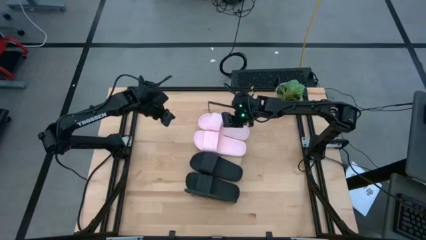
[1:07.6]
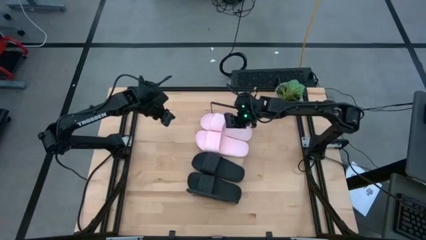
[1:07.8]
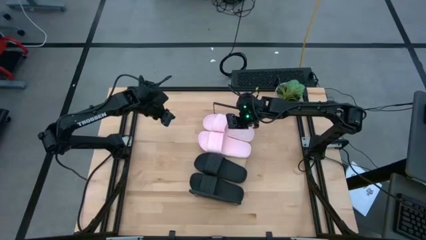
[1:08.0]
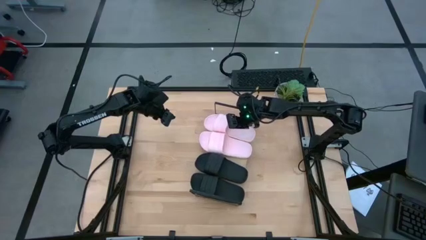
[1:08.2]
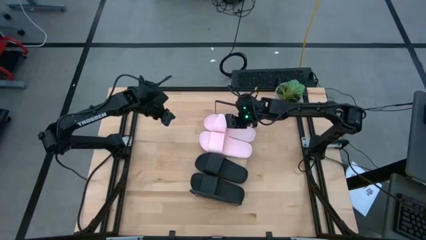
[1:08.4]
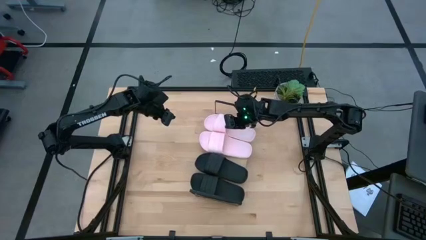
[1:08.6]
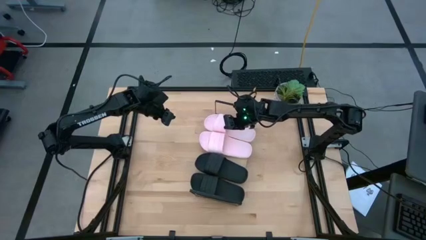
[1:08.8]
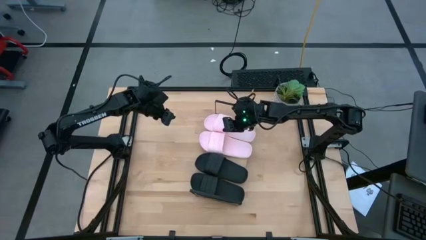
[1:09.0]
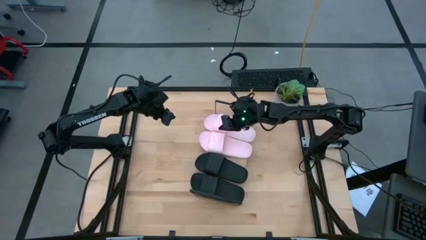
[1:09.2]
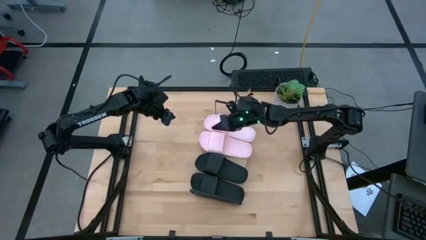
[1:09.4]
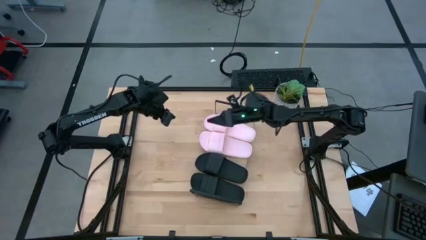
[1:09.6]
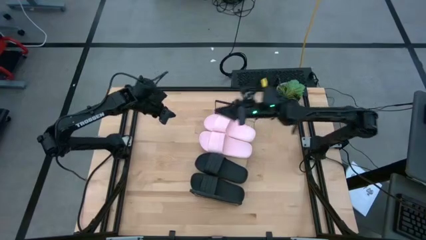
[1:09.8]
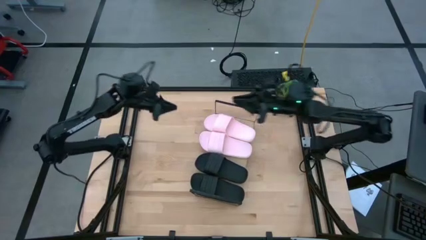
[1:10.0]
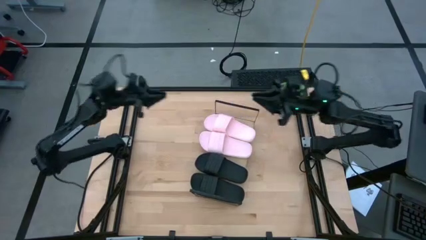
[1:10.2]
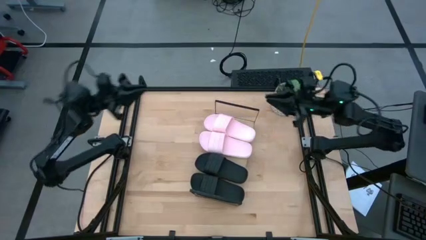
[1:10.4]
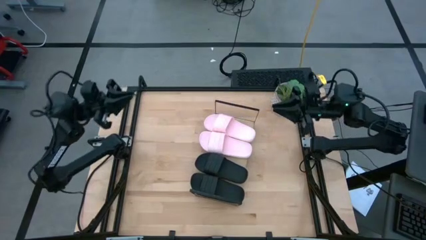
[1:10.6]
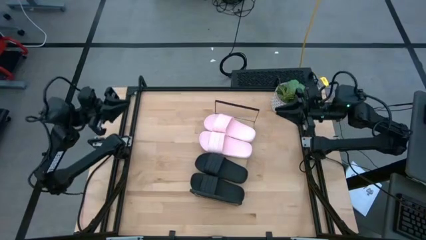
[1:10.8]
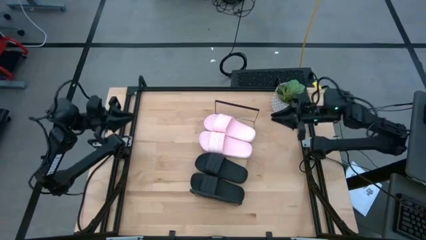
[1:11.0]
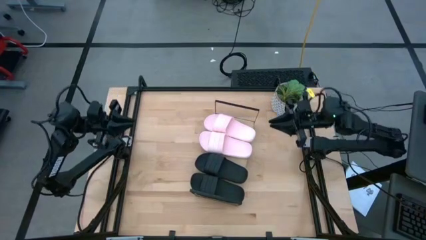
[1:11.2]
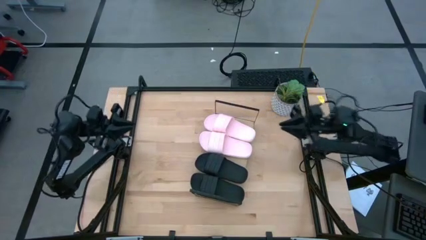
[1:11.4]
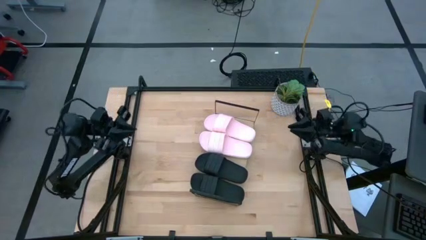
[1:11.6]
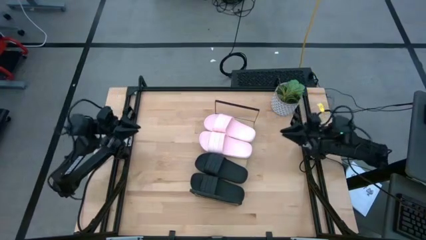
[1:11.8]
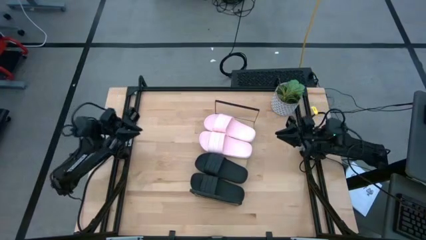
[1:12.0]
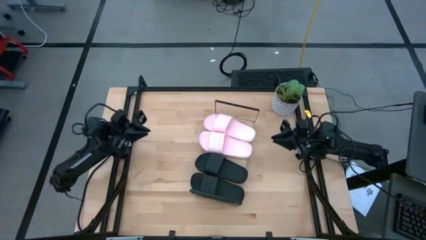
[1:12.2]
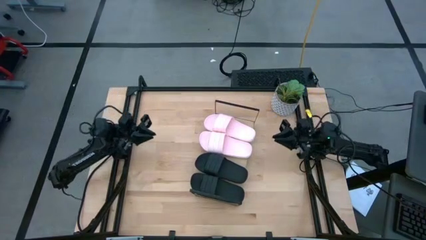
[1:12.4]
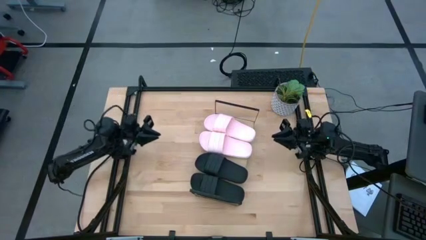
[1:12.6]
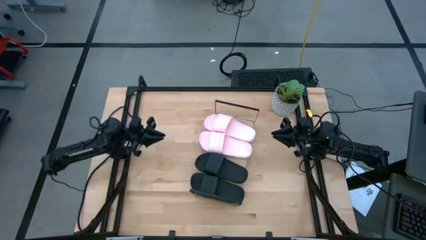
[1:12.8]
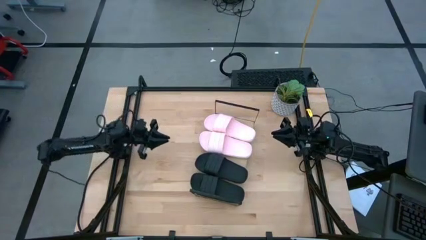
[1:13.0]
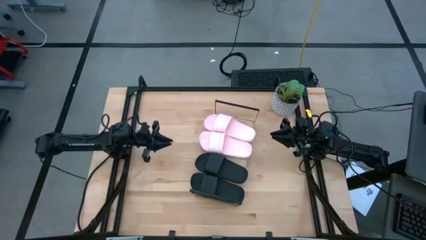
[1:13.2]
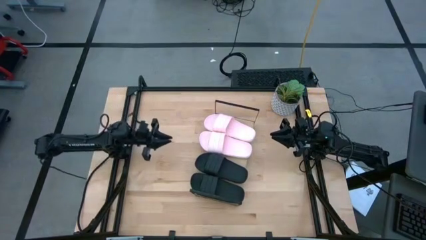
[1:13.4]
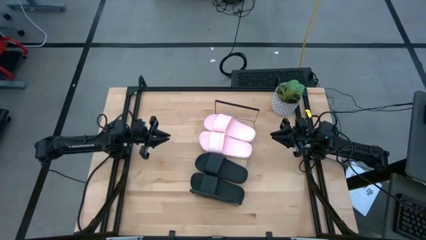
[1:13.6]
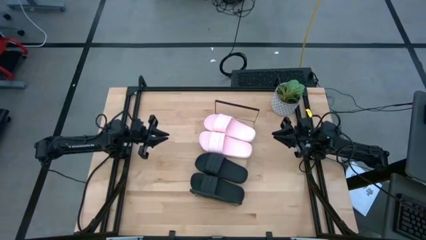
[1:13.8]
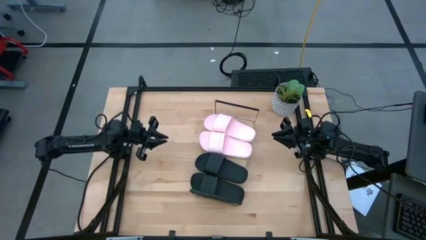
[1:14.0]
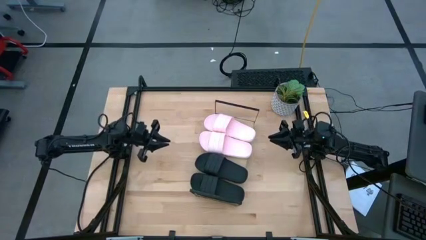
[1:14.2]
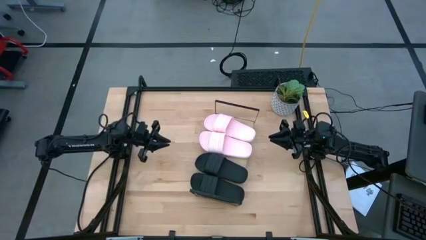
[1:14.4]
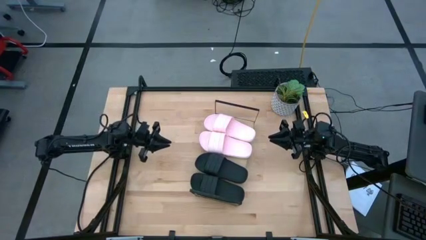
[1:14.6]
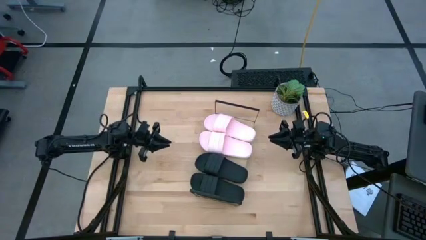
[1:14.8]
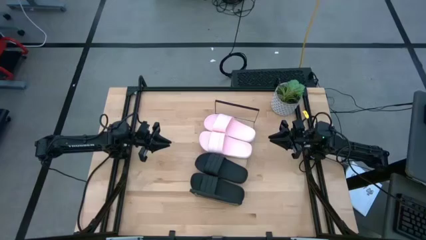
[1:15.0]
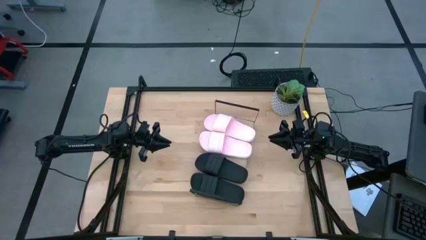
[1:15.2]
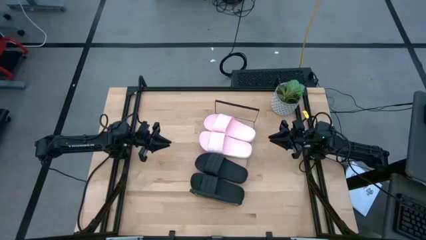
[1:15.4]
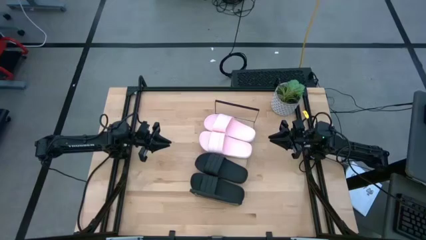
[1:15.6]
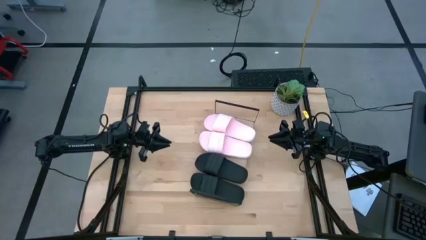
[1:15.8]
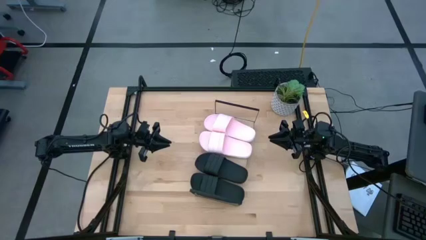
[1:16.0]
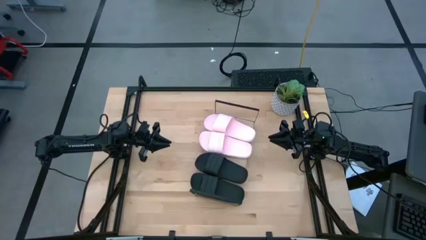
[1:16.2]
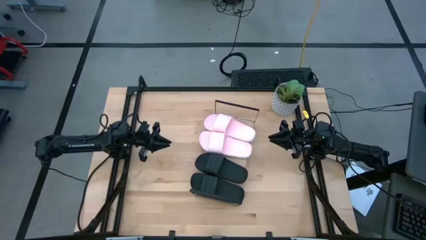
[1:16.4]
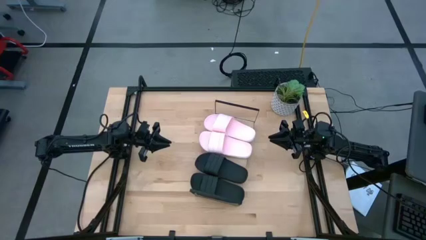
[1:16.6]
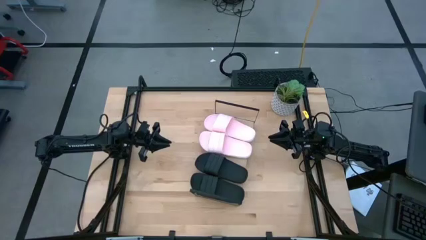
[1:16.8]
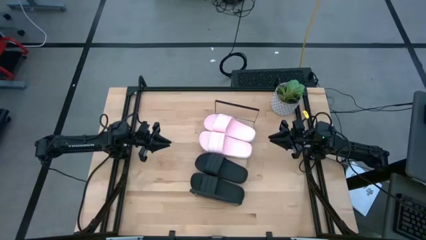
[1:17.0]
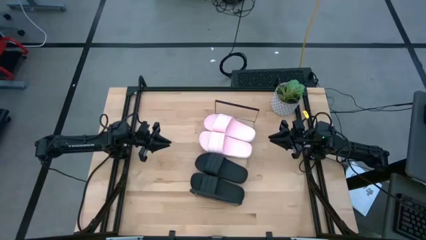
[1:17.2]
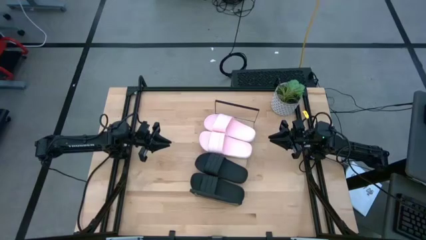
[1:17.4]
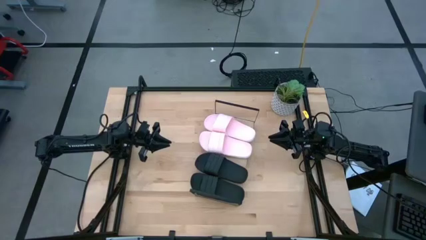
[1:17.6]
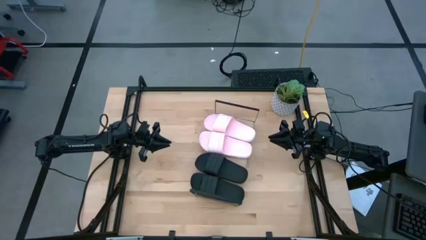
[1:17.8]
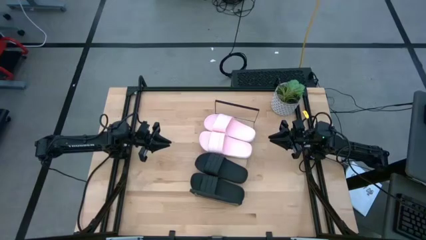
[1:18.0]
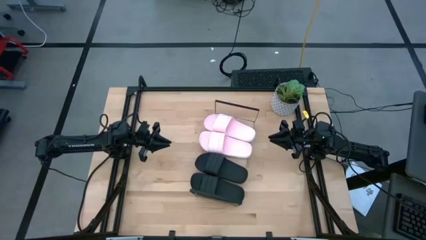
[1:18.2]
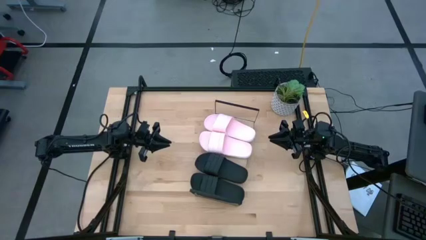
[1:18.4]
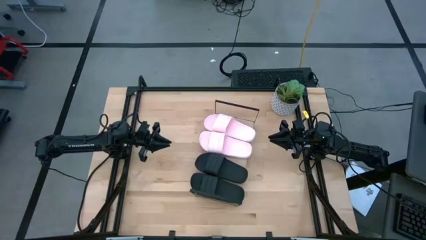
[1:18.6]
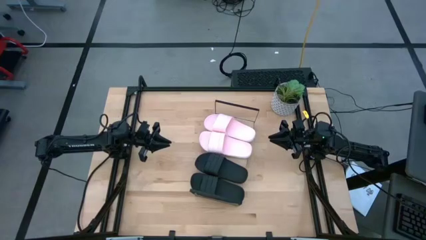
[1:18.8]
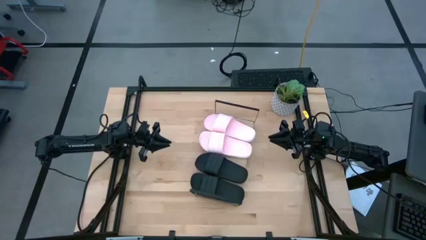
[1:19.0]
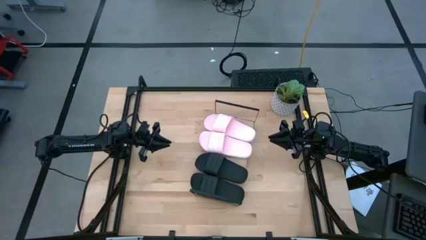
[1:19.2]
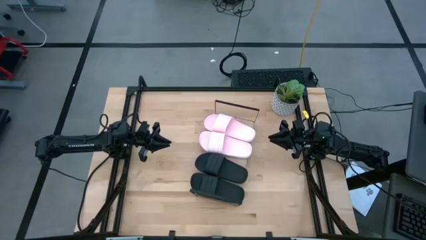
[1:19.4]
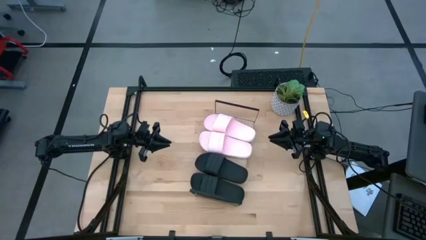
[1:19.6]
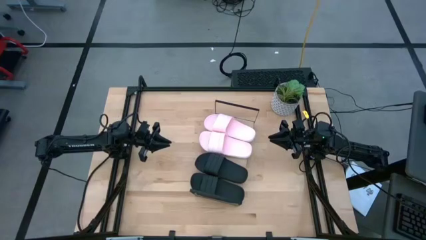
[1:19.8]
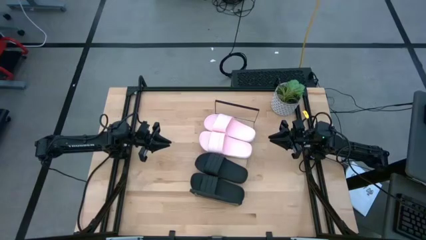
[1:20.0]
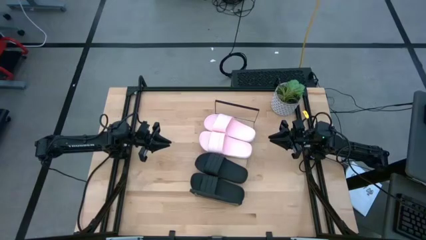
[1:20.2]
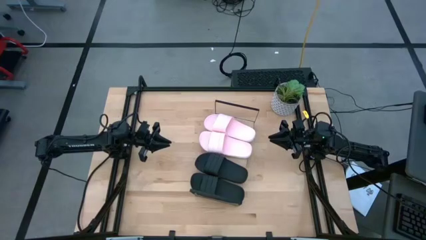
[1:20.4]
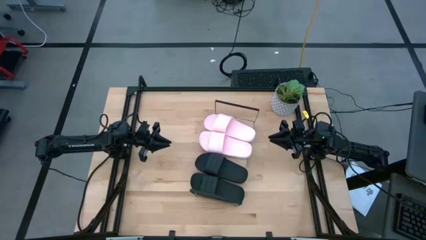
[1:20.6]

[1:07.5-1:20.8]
Task: Pick and place slides into the shelf
Return to Home Position

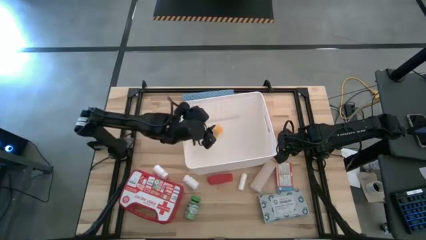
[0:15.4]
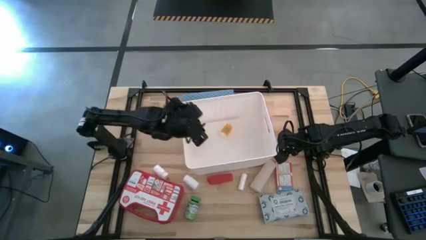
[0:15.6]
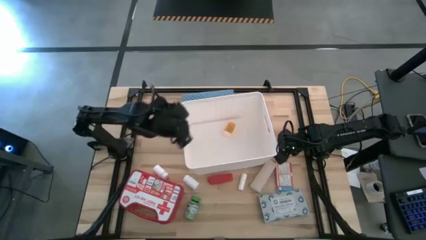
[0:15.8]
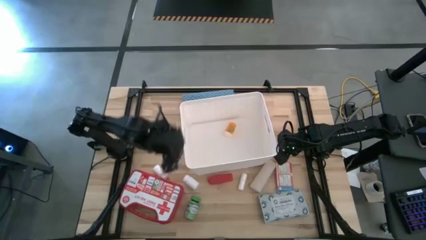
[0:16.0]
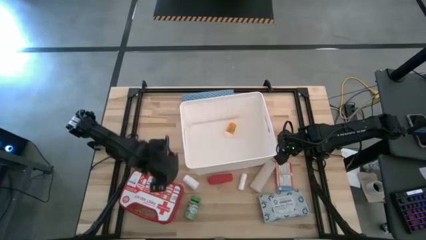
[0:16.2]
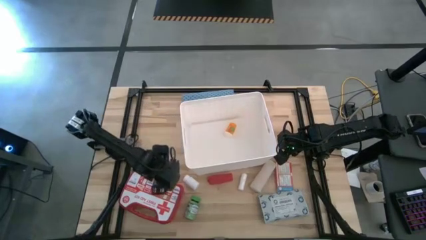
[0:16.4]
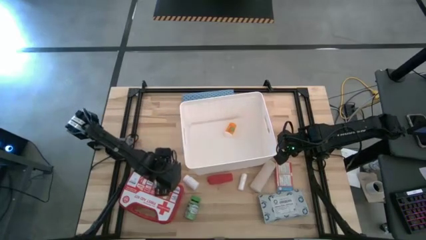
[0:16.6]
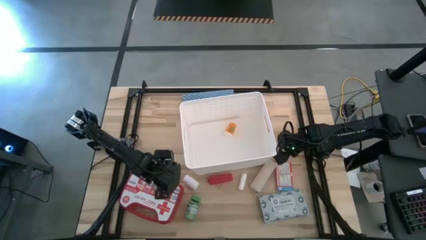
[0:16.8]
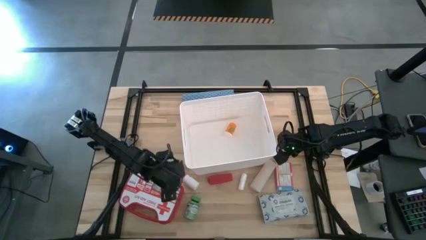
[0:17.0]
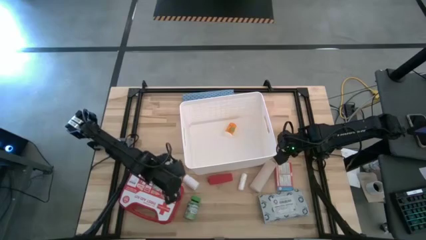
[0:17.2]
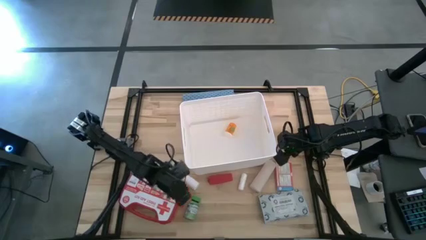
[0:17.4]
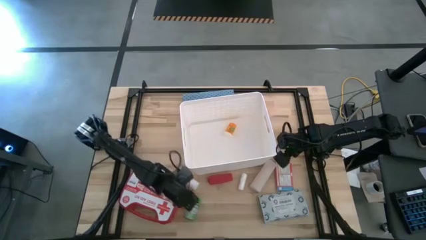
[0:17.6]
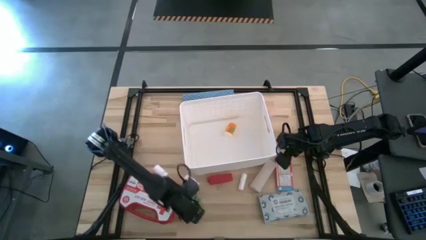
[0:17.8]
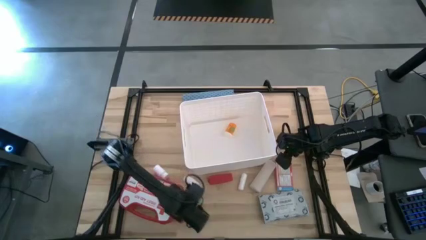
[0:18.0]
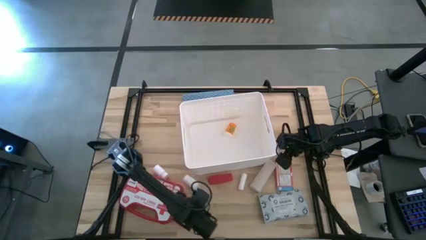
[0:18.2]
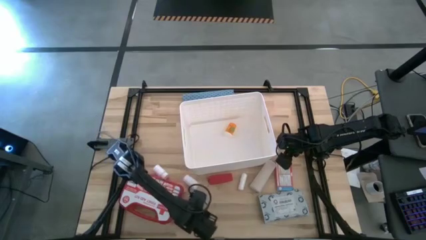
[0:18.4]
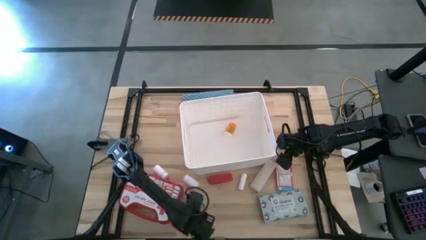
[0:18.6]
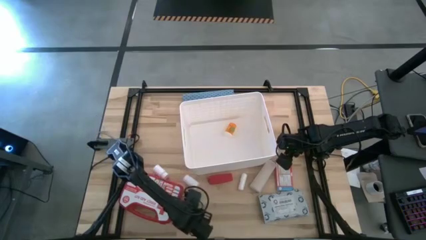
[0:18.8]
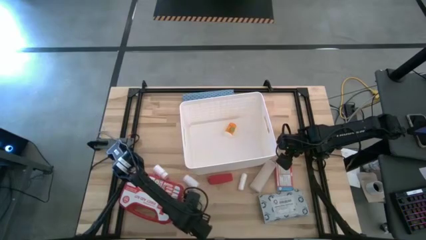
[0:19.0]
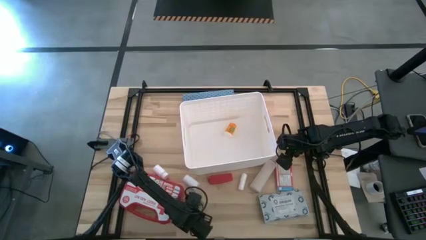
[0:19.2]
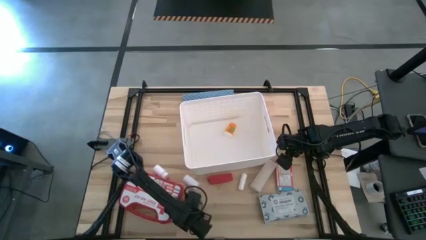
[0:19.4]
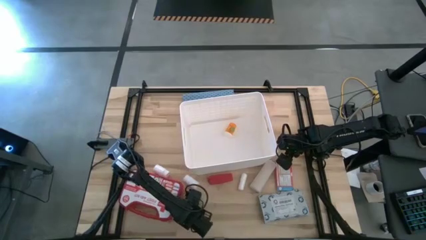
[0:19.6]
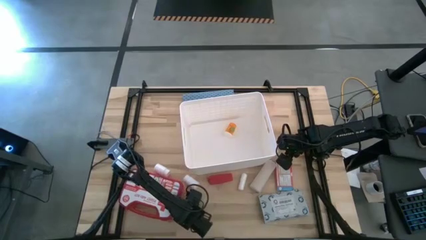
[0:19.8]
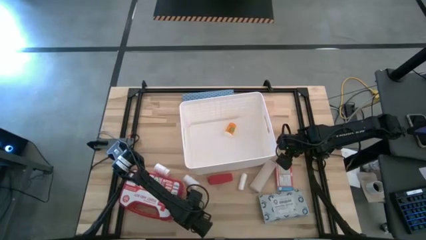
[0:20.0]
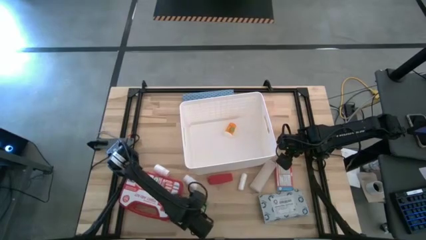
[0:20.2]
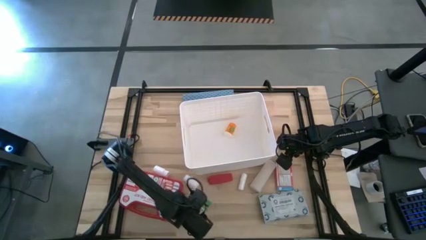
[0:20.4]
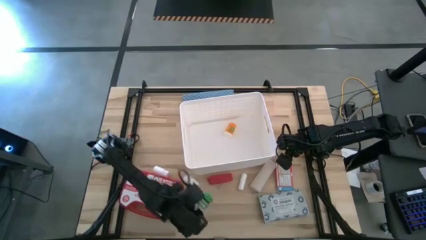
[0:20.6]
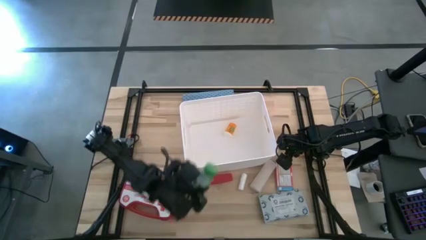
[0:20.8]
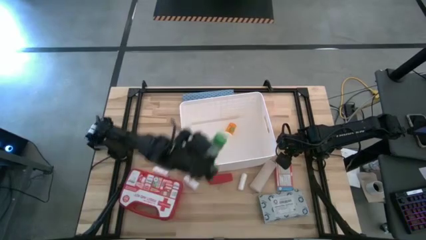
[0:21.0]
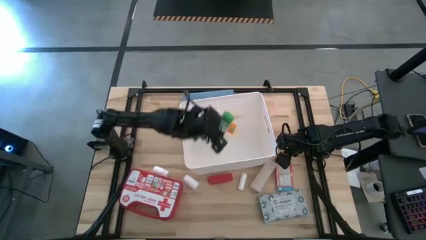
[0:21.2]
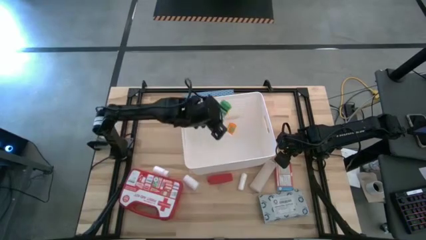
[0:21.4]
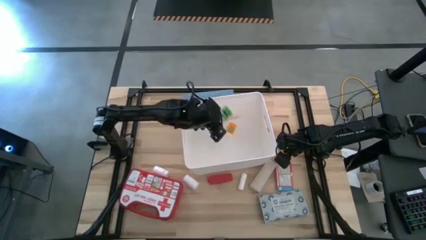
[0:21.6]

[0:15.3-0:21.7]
Task: Pick & place medical supplies in basket/bin
Put the green pill bottle into the white basket
